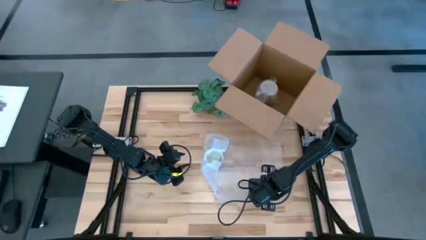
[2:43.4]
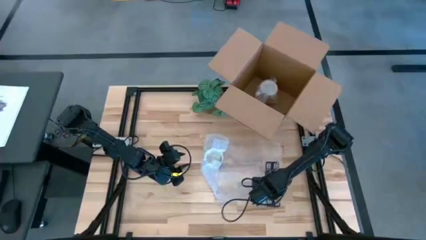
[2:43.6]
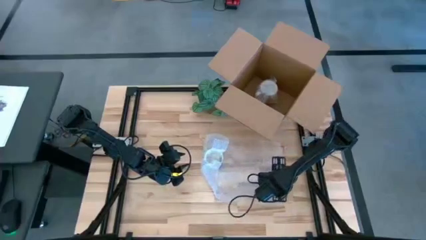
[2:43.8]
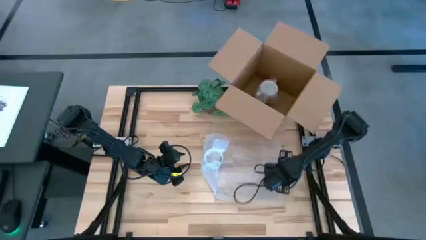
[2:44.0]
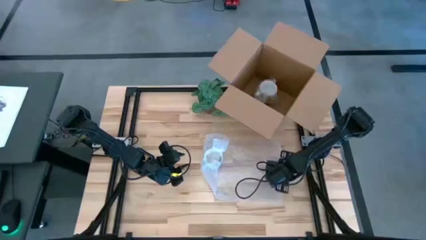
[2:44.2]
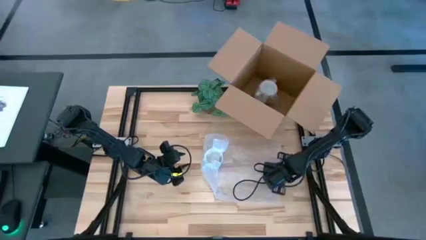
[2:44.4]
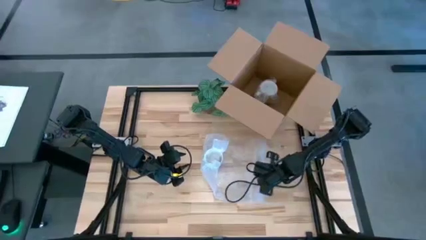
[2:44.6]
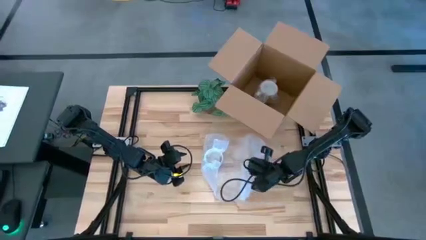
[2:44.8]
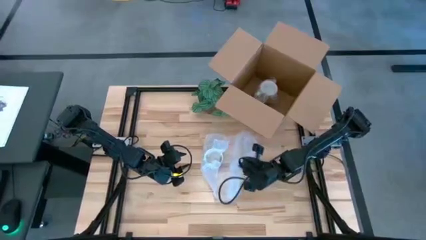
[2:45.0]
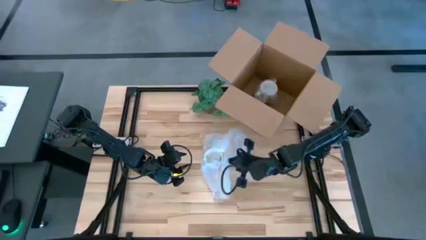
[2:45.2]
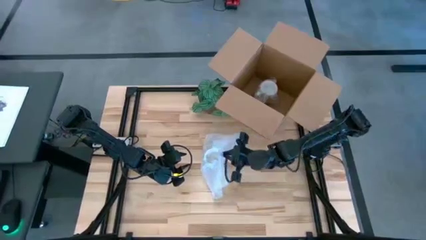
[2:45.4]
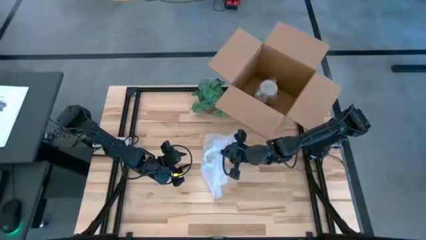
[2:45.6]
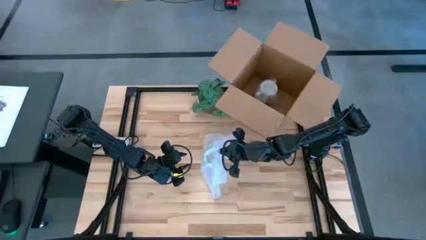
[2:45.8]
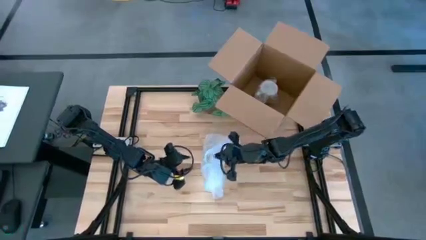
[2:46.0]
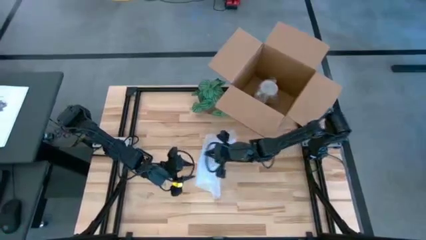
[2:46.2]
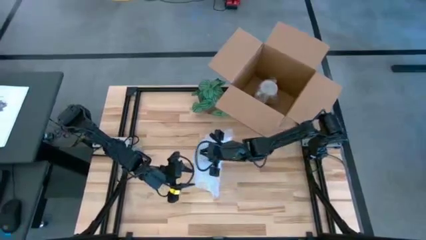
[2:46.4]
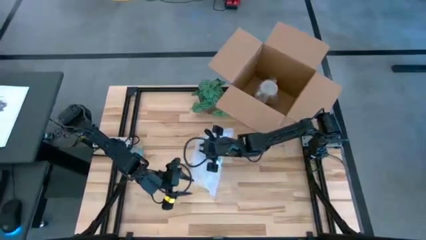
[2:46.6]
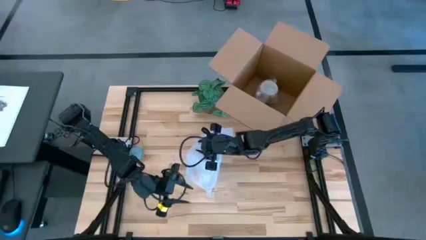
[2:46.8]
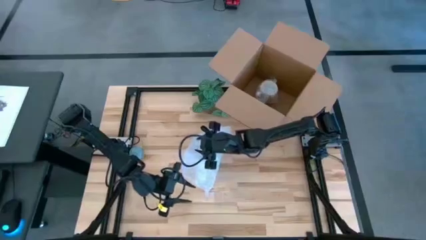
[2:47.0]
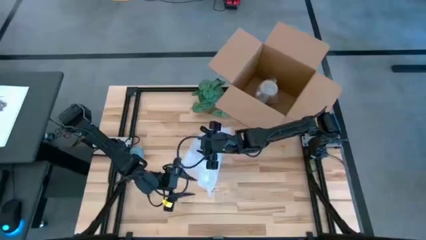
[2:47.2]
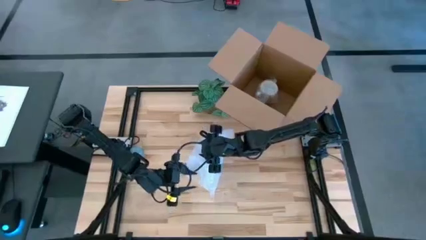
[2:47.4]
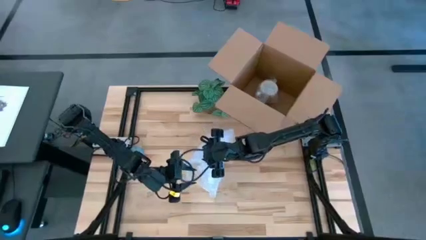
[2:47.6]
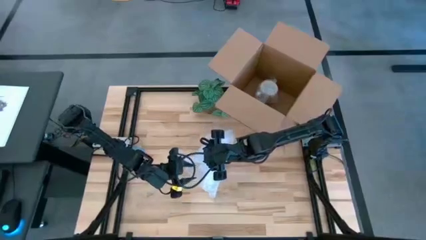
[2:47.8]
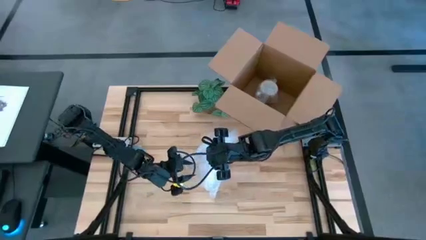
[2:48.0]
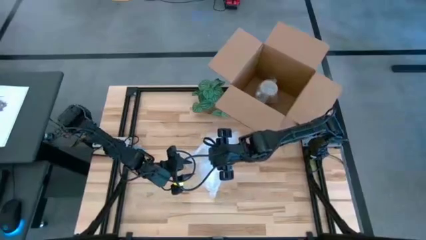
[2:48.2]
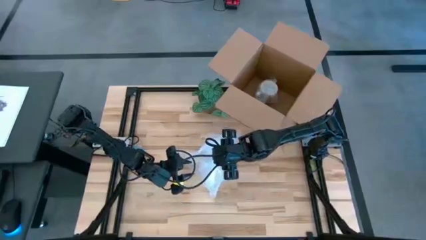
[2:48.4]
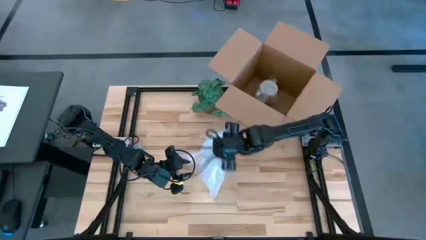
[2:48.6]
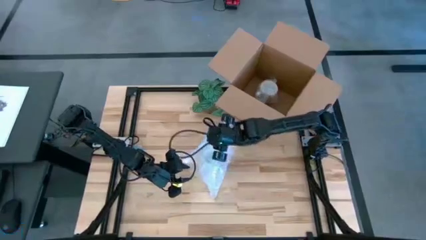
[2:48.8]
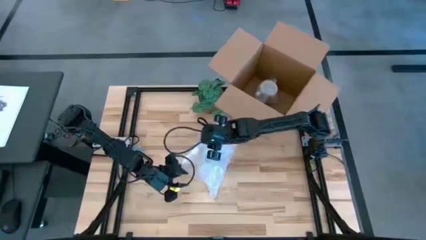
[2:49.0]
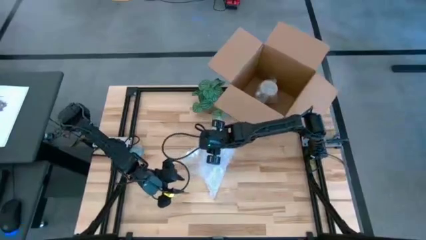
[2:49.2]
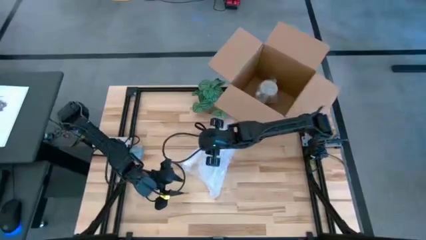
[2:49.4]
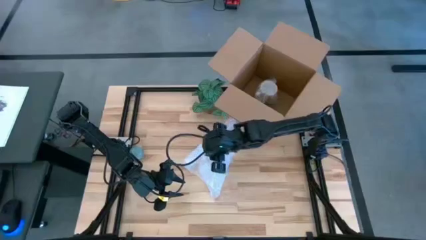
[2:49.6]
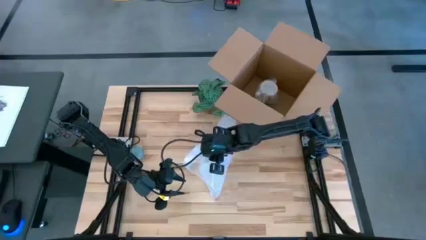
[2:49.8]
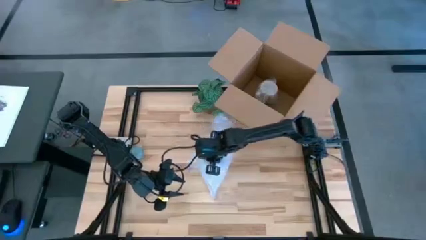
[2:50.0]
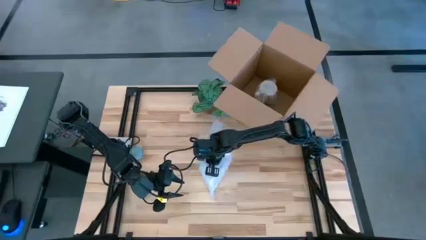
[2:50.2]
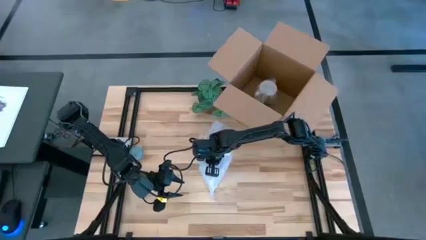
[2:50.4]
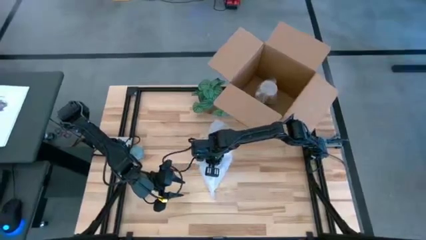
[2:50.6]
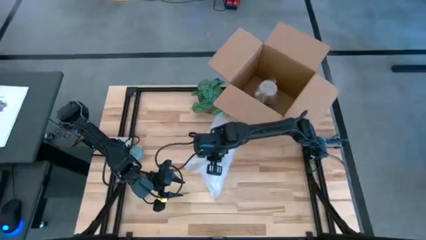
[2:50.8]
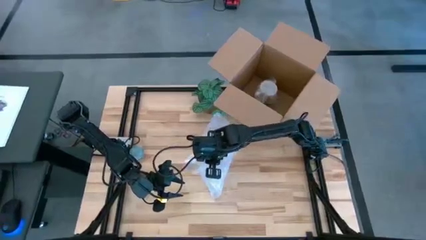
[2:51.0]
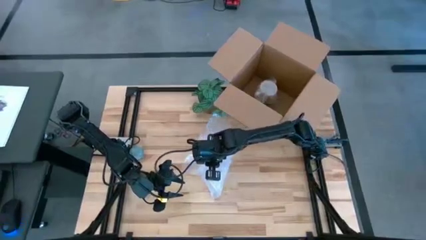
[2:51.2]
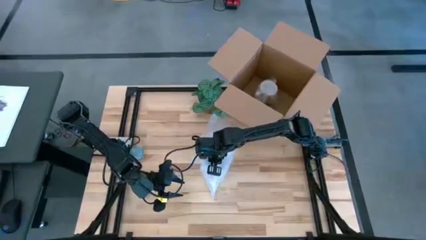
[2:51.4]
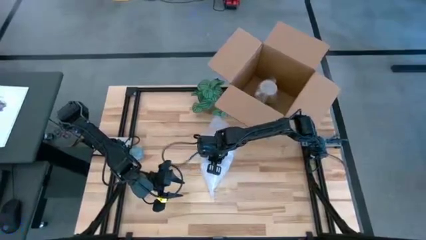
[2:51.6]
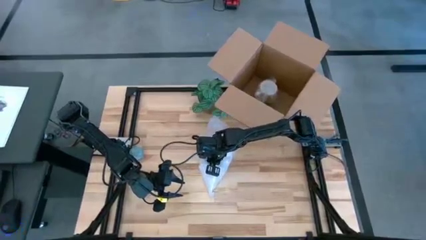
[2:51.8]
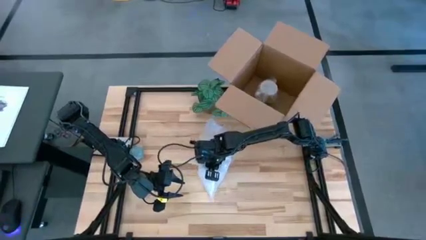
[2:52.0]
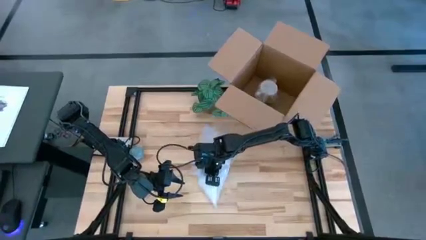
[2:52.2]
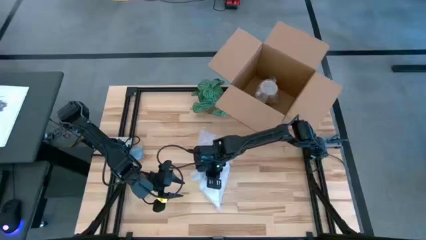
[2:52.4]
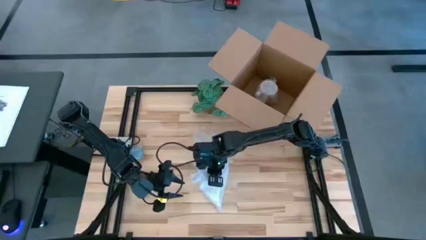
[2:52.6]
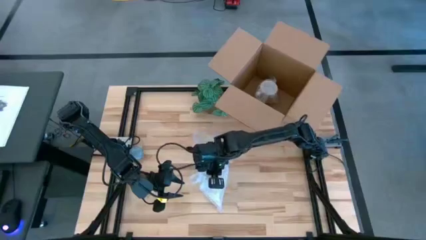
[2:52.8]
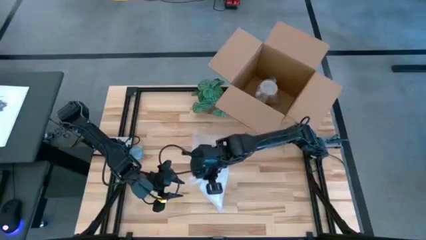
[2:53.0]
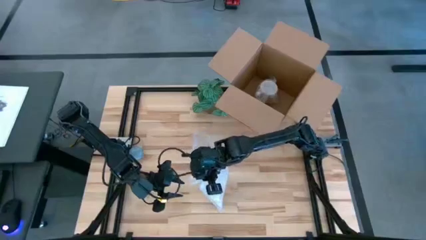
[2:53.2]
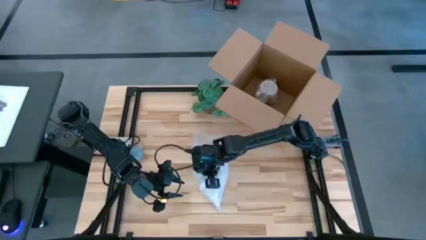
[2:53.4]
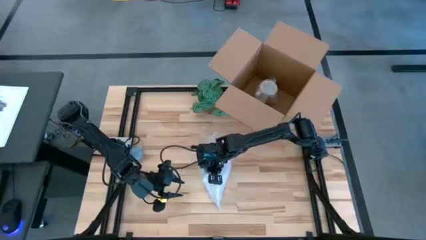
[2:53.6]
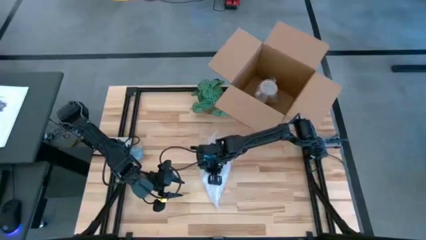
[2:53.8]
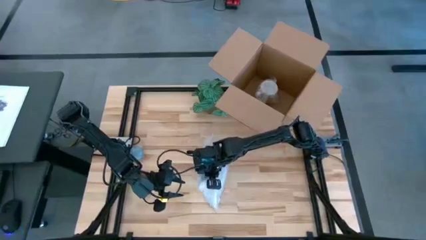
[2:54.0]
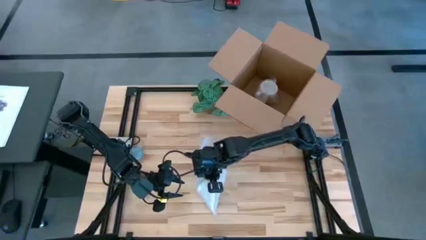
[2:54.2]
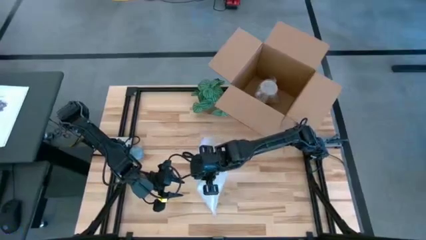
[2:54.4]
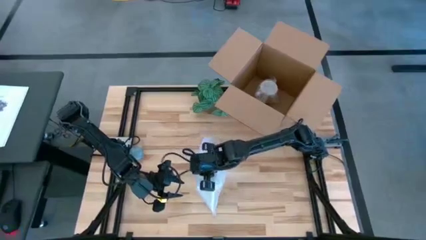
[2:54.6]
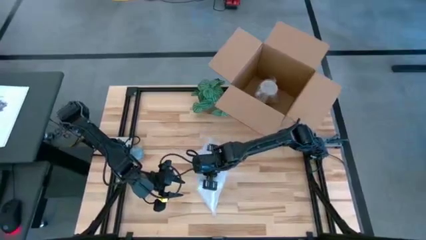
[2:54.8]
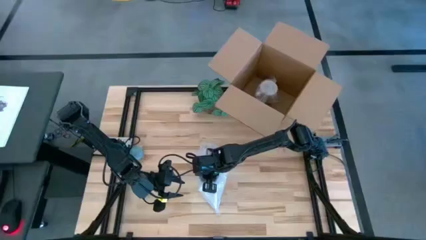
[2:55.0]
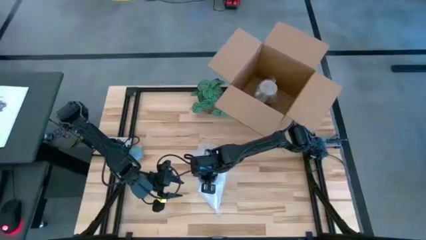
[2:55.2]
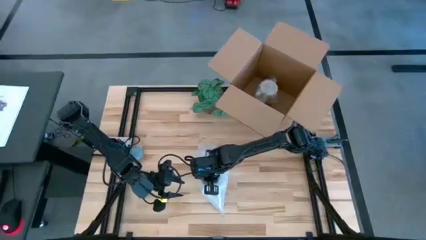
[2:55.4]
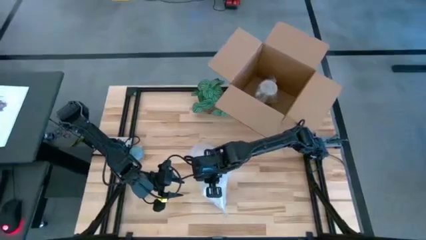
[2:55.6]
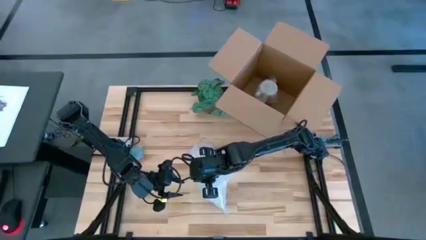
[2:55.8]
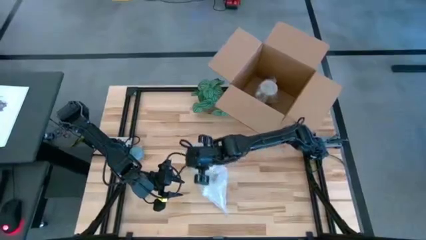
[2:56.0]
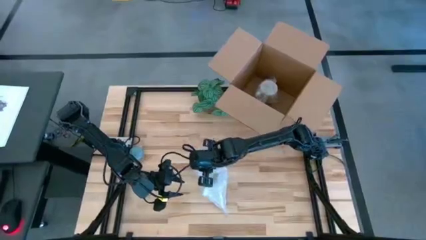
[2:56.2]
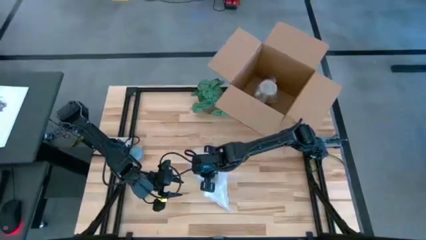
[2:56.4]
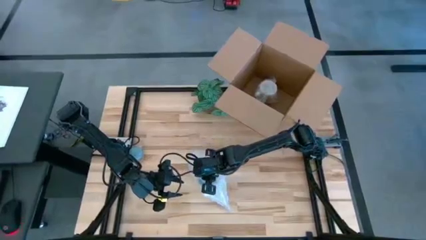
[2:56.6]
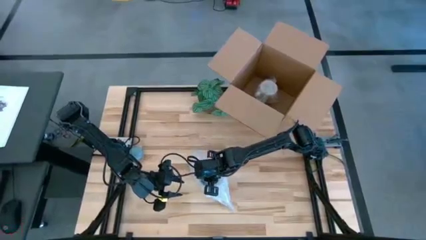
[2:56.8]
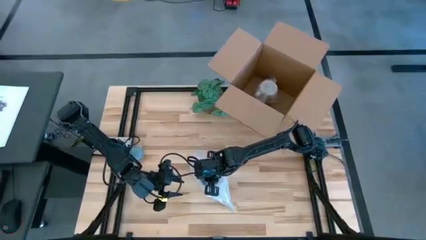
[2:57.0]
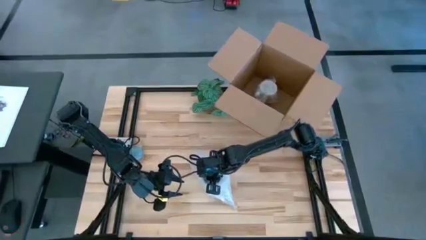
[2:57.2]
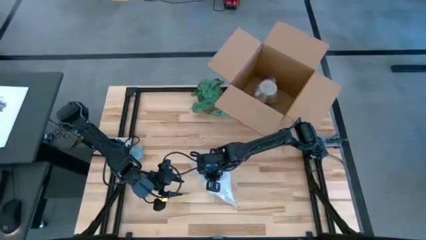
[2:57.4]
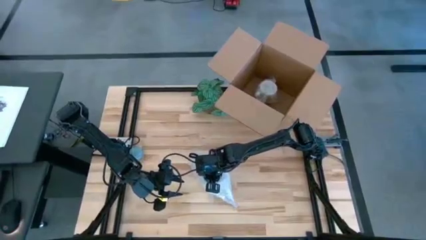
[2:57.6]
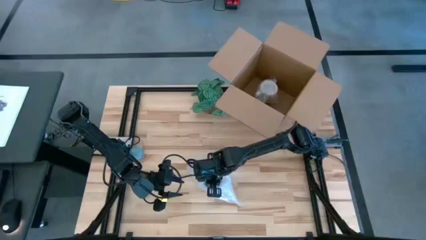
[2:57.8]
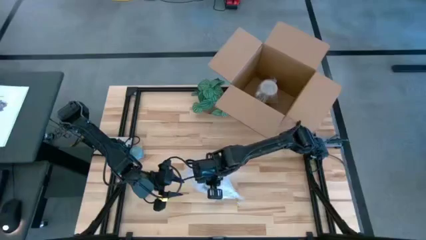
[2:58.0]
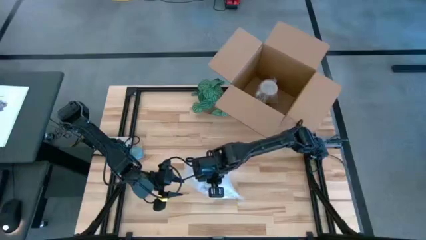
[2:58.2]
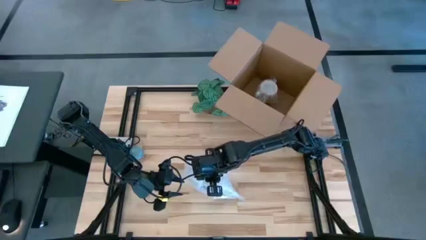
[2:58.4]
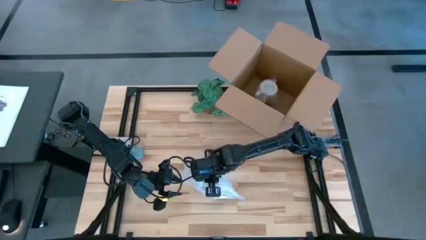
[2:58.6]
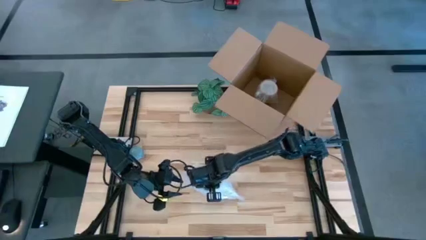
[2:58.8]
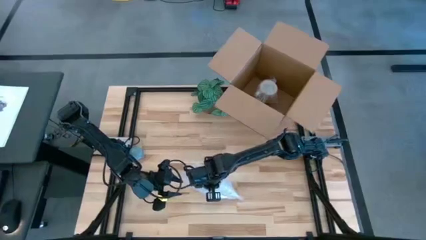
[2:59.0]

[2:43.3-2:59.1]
Task: wrap mug
Wrap the blue mug
